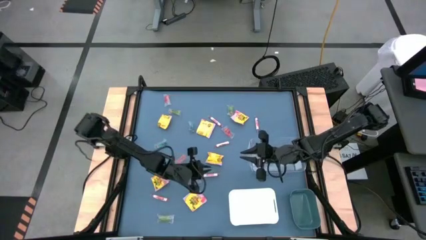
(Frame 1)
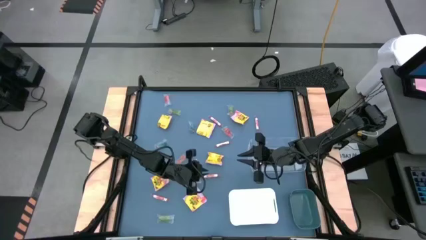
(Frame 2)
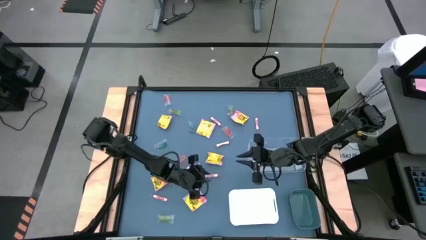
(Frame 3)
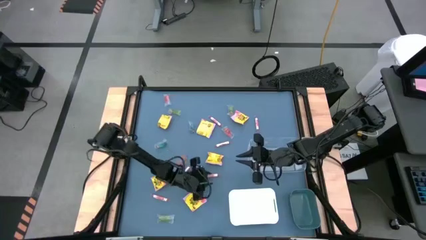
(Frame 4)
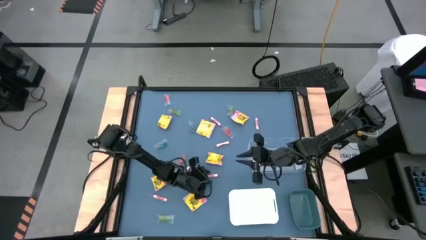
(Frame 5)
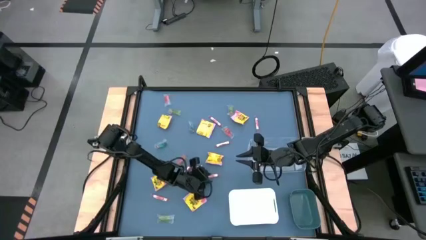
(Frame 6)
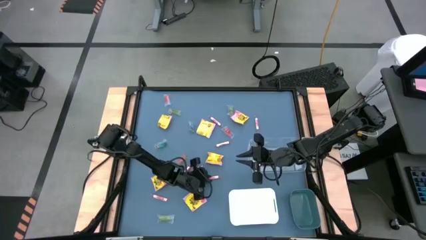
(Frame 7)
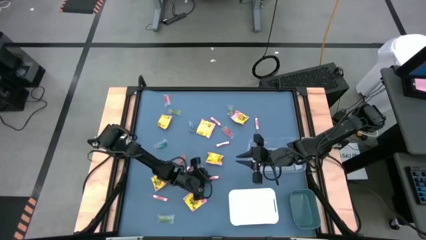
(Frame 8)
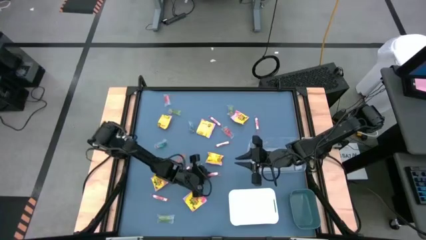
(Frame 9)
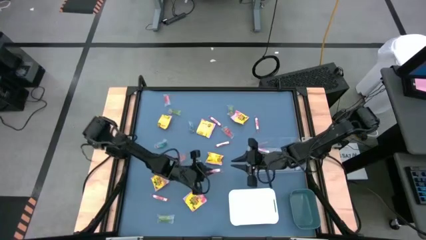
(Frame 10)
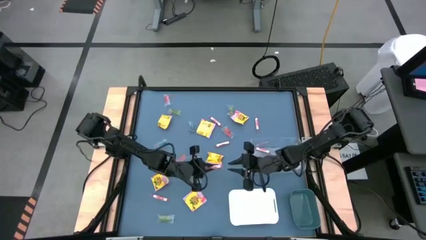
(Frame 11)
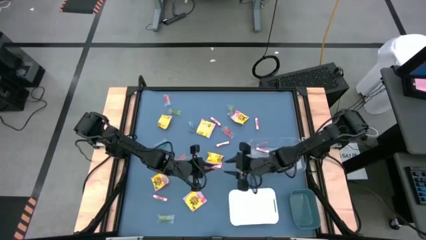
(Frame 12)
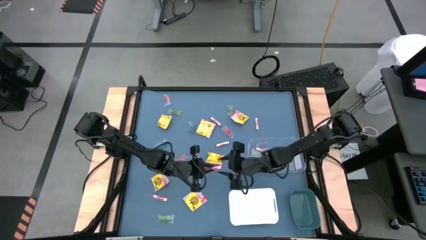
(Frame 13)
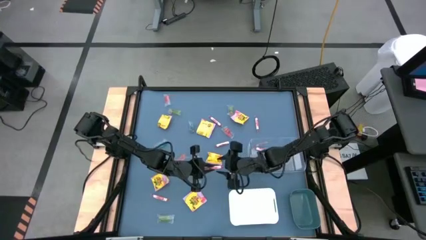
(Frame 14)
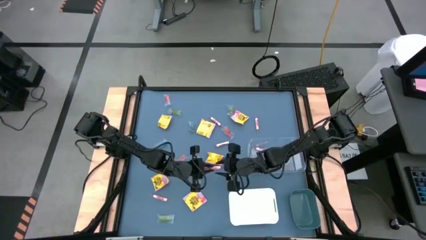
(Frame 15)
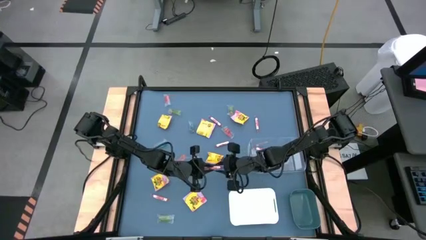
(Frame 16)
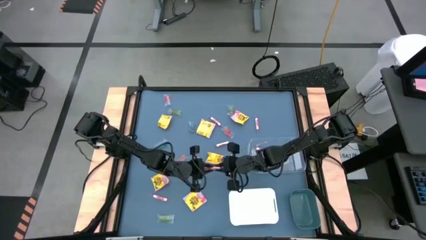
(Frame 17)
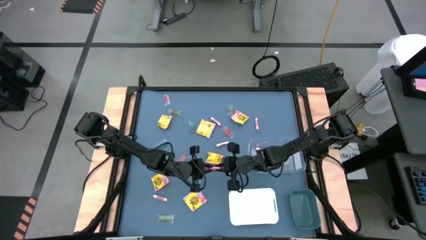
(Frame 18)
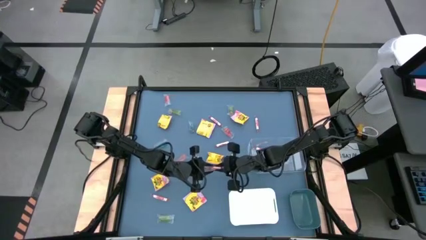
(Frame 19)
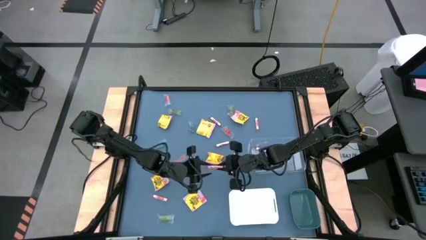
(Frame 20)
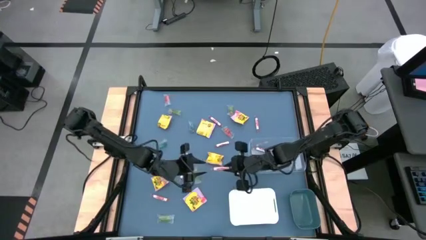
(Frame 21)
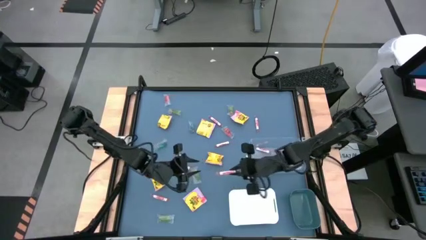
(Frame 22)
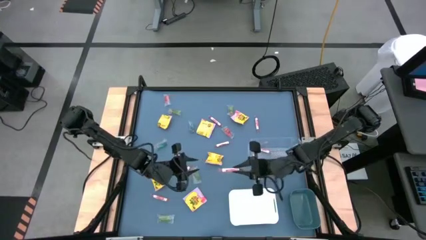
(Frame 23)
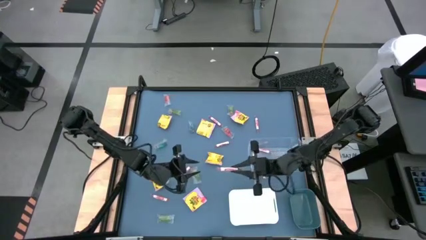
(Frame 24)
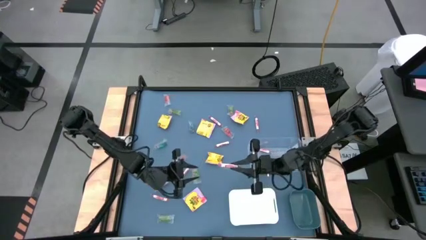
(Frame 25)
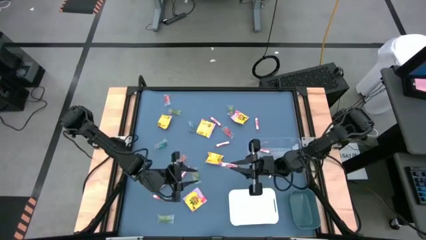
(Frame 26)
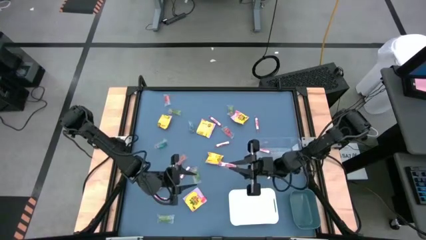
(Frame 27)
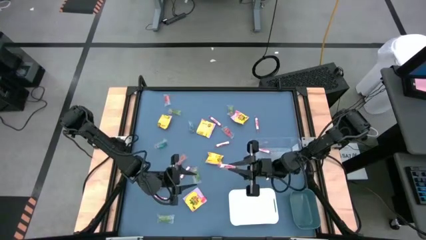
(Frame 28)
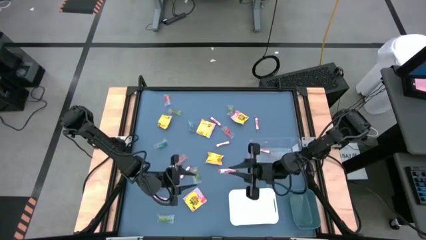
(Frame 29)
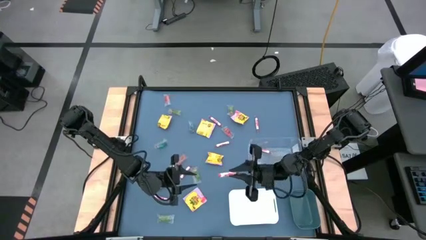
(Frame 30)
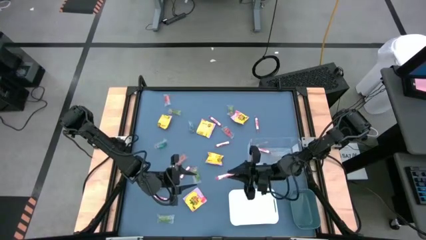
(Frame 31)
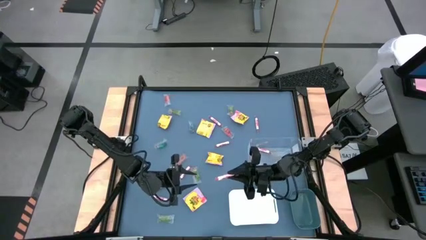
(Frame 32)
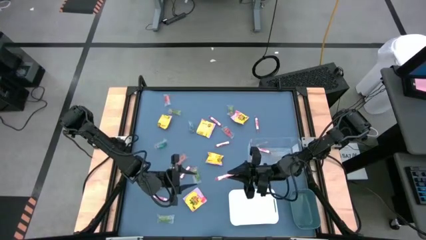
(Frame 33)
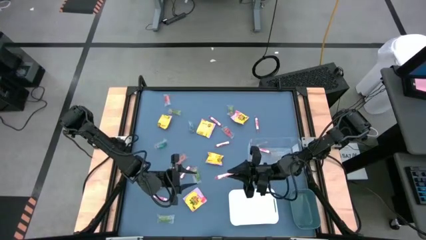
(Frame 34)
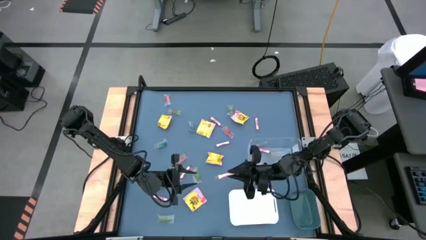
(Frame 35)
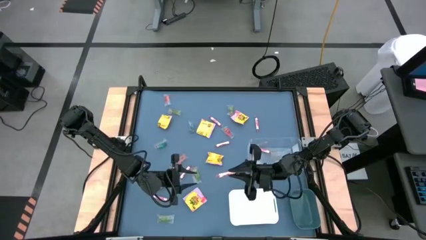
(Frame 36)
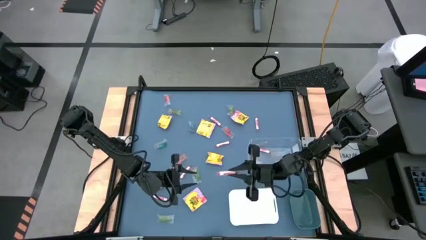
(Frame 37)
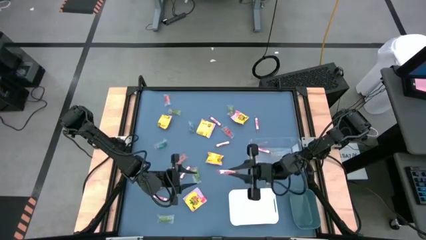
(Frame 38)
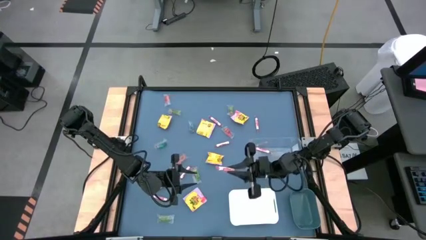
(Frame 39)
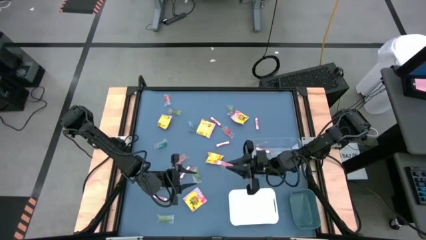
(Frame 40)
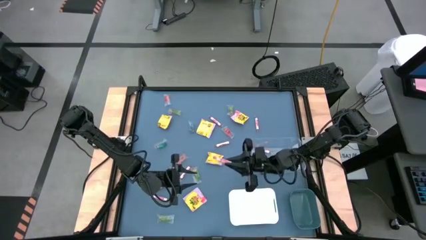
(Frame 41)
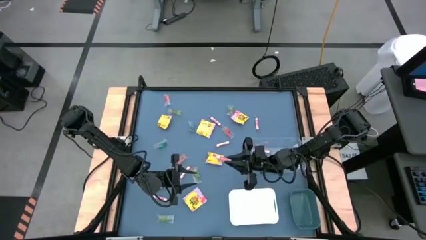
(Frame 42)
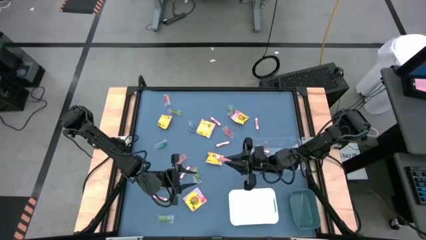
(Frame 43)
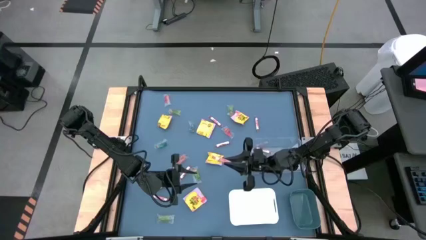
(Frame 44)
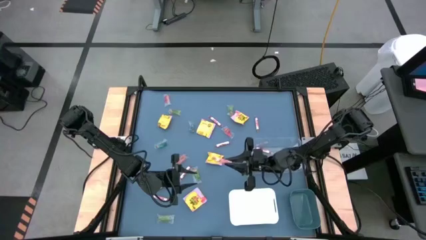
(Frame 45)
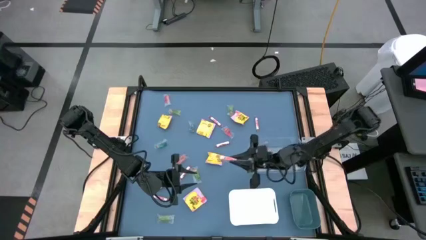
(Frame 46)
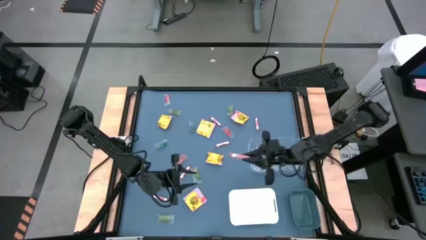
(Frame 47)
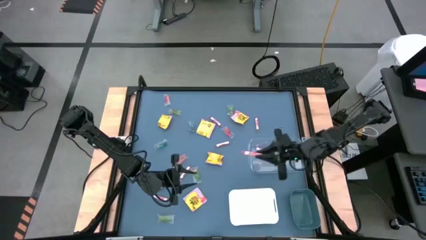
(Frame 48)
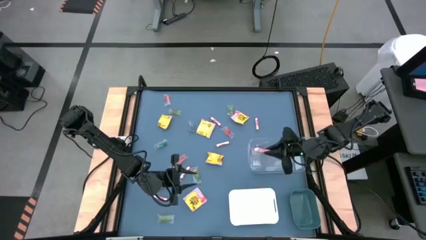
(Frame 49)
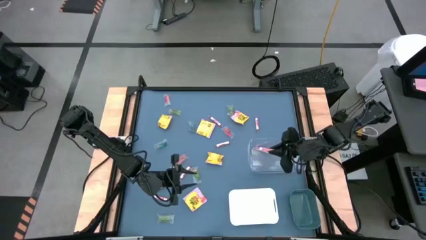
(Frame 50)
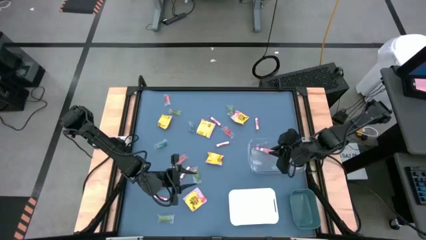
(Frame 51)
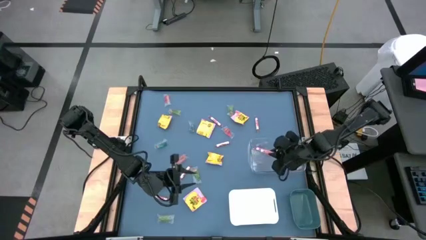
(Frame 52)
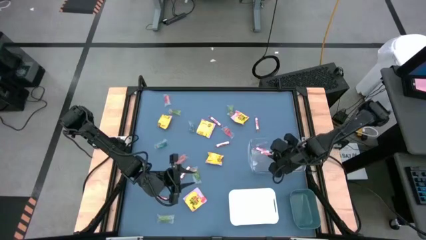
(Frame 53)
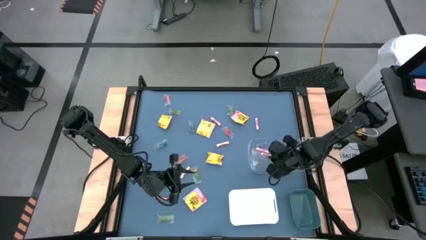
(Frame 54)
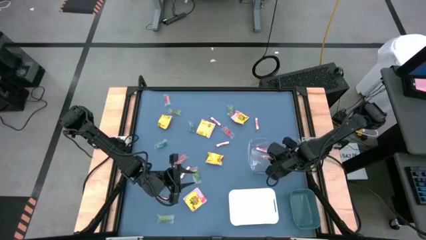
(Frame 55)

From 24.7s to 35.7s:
Task: Sort candy
Put the transparent candy roll into the transparent bin

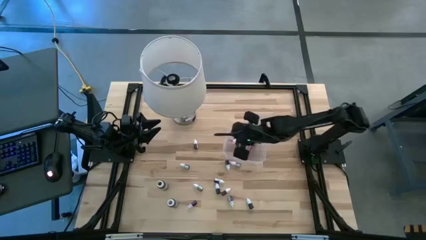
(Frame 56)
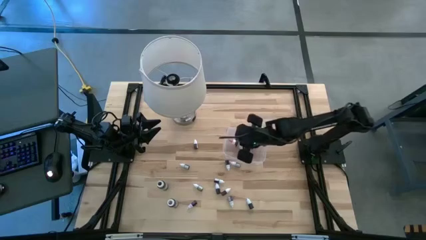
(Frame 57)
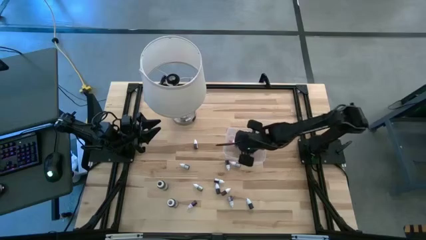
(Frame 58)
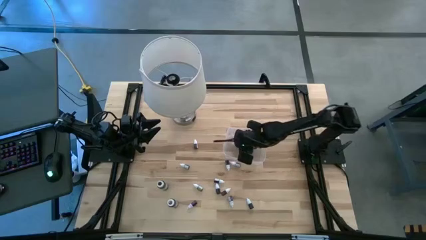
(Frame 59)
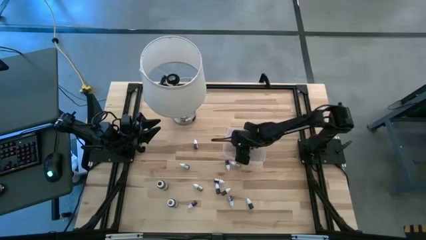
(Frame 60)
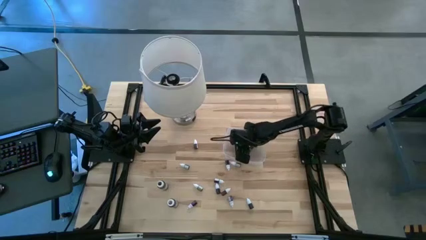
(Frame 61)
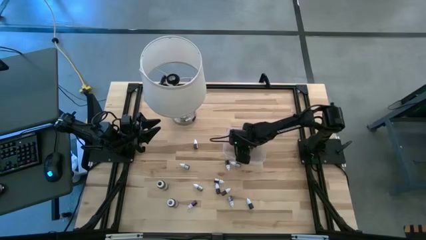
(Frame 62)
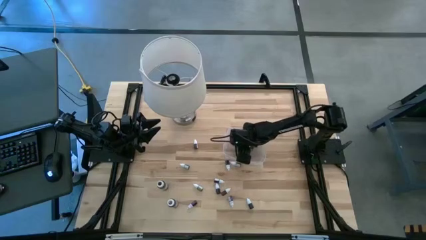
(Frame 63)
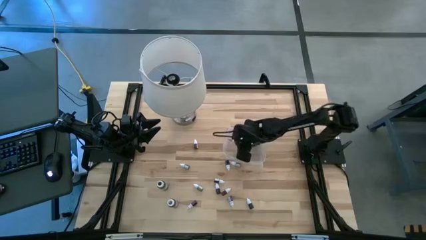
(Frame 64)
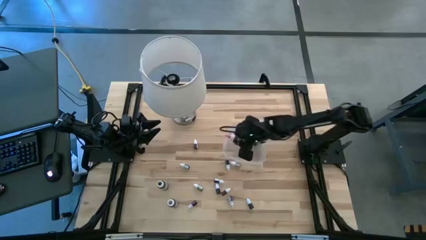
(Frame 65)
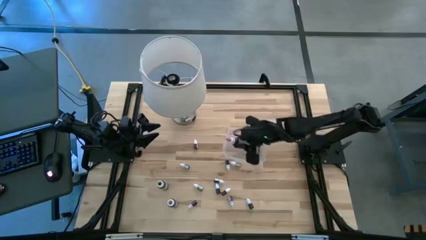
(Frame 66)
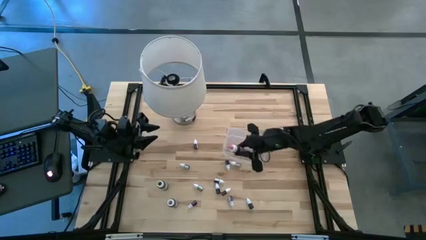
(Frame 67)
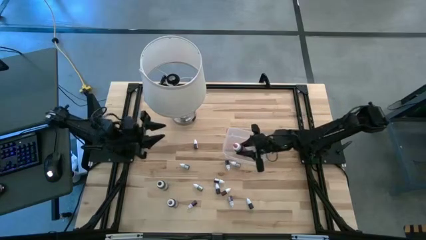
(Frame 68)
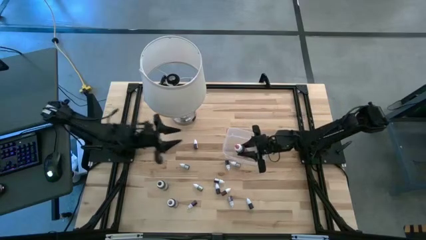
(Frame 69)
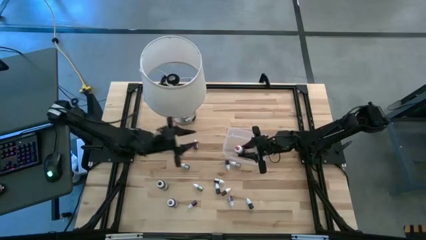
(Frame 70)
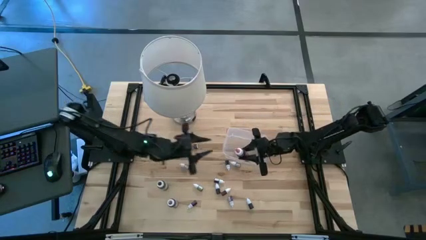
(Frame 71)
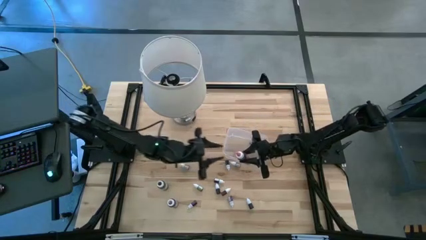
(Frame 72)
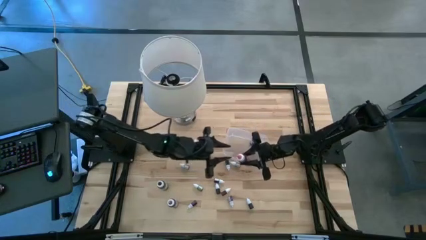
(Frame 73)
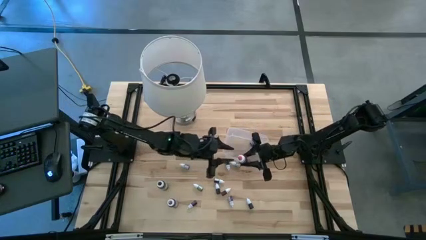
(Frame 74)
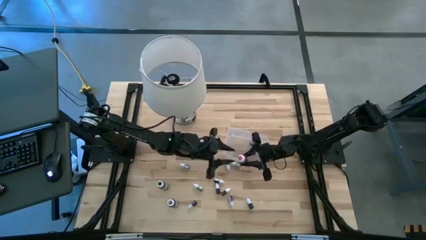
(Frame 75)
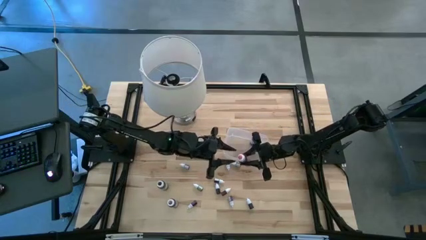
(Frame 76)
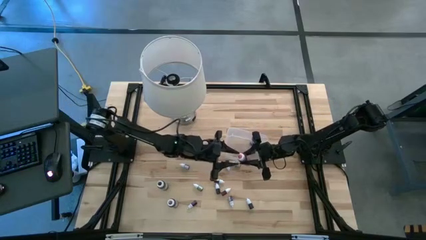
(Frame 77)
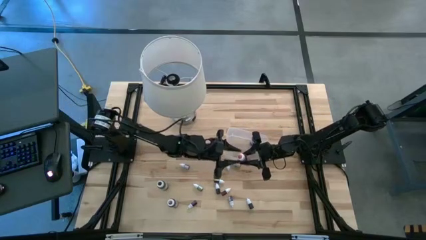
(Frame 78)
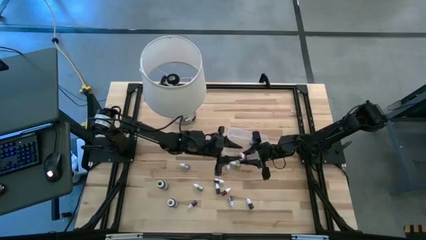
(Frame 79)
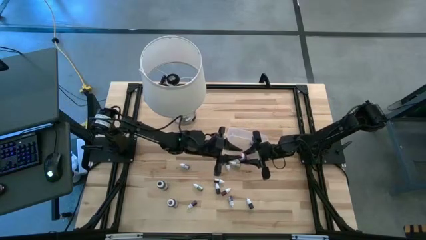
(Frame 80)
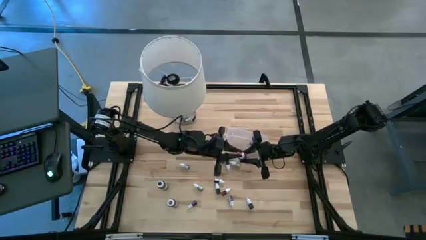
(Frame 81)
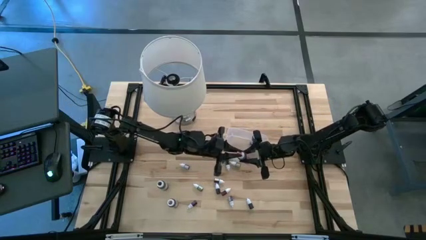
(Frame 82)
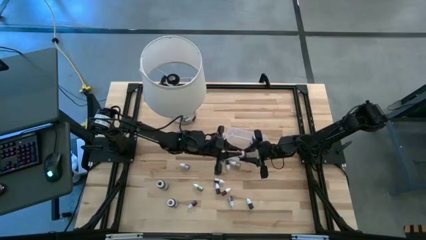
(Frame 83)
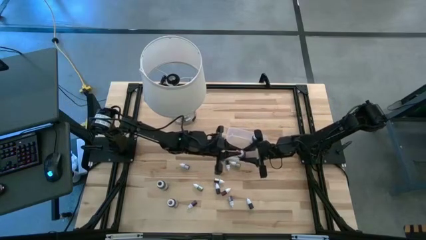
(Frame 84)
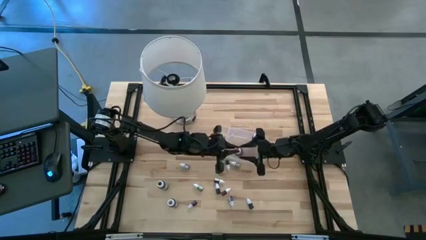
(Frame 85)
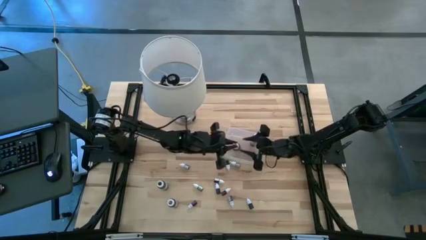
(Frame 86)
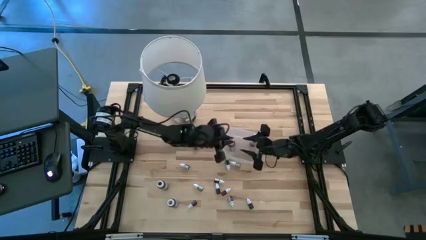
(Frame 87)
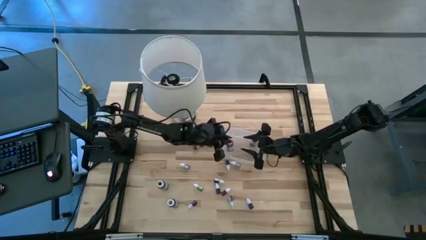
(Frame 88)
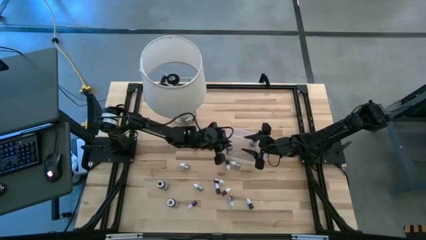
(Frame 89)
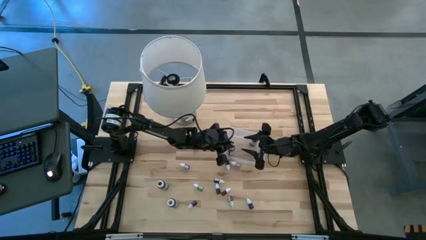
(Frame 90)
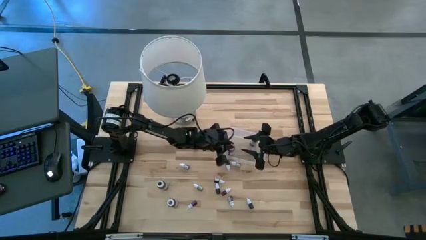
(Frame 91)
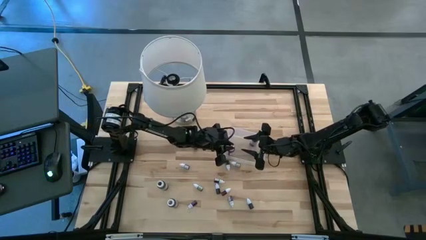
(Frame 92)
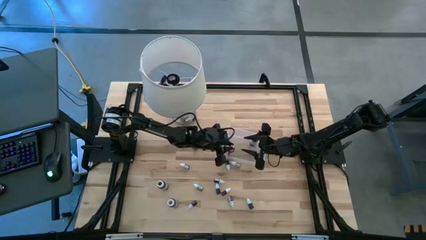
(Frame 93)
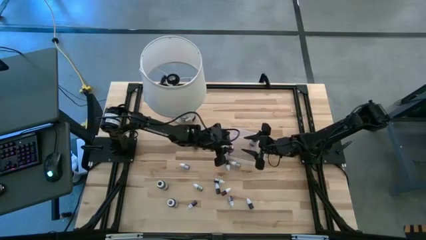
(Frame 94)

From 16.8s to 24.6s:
Task: Pick & Place food coloring
Put the large pink food coloring bottle into the transparent bin
